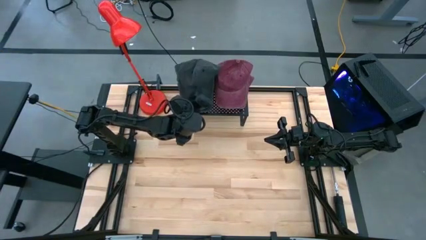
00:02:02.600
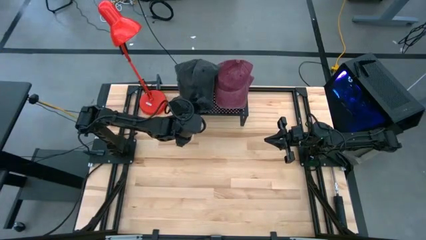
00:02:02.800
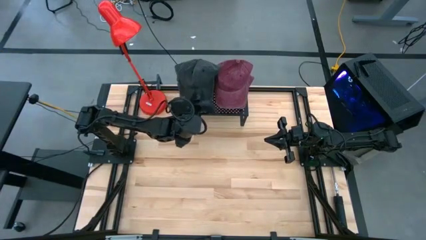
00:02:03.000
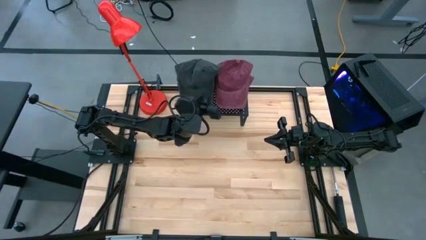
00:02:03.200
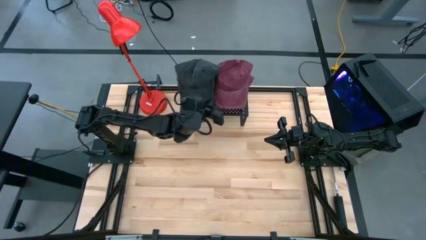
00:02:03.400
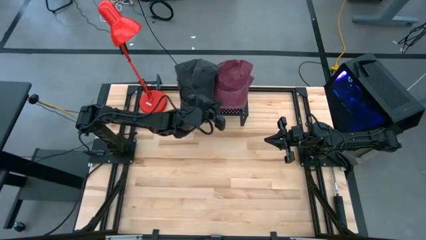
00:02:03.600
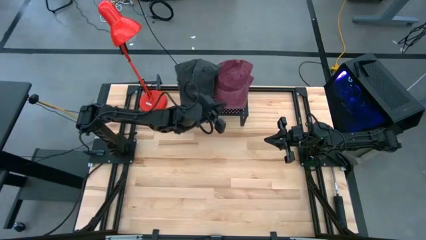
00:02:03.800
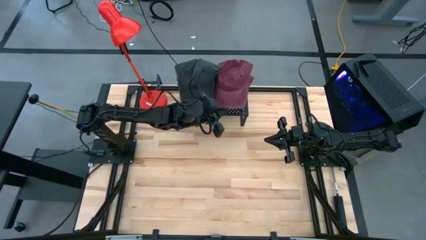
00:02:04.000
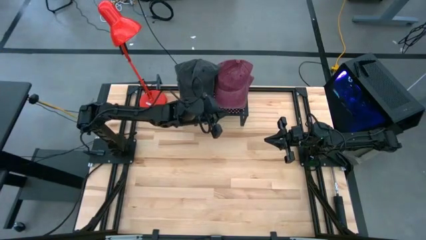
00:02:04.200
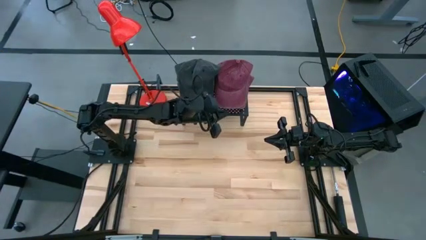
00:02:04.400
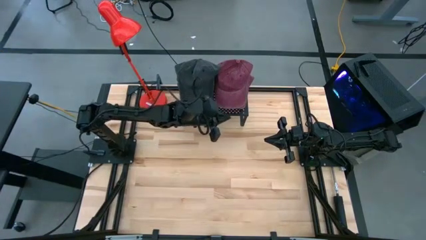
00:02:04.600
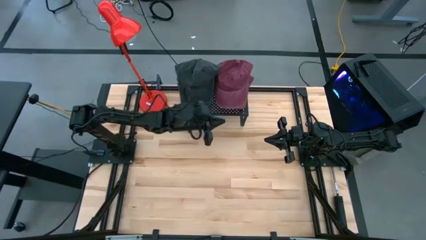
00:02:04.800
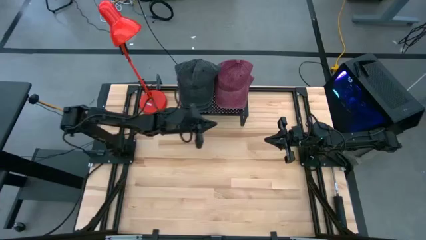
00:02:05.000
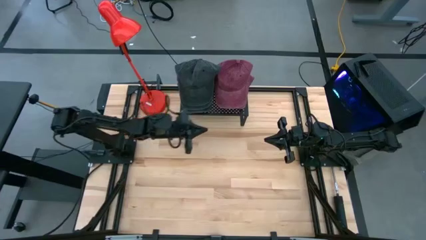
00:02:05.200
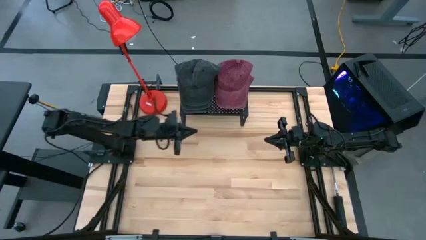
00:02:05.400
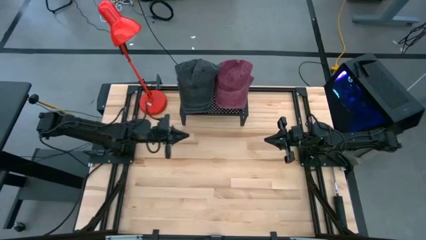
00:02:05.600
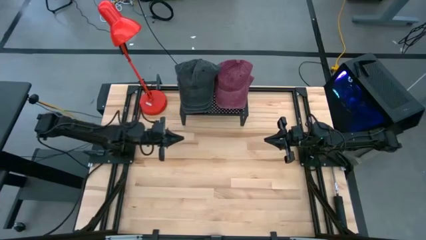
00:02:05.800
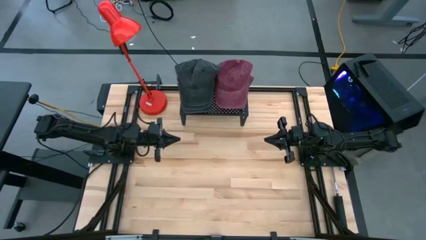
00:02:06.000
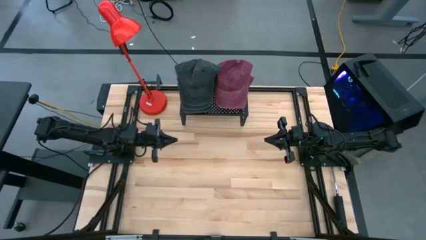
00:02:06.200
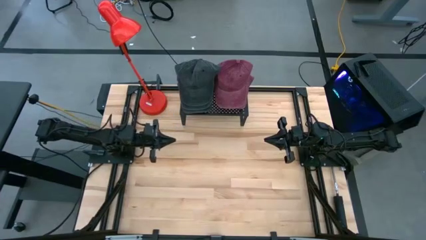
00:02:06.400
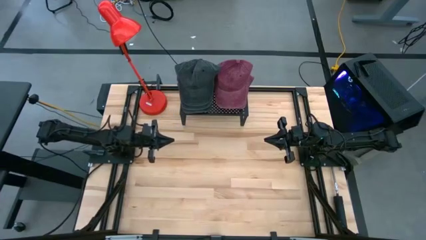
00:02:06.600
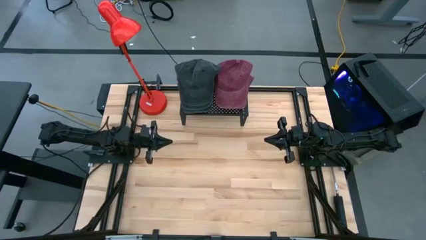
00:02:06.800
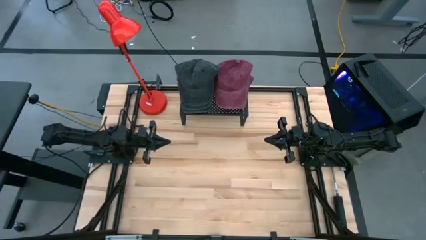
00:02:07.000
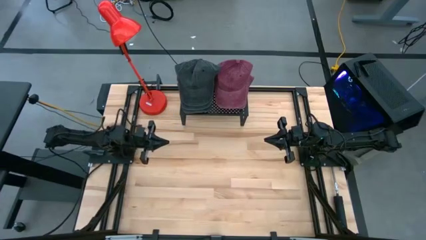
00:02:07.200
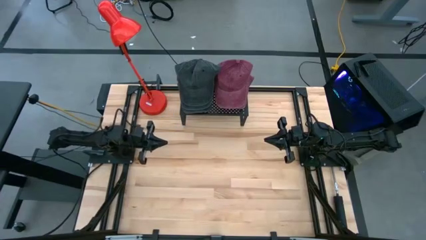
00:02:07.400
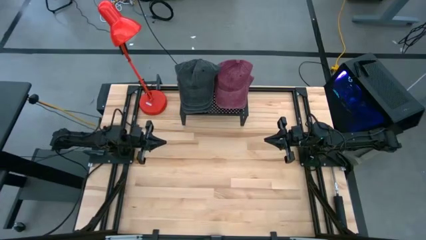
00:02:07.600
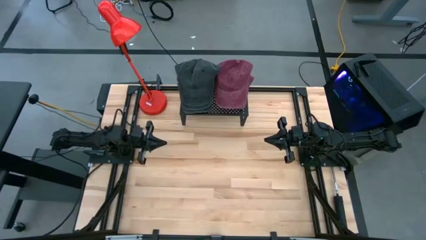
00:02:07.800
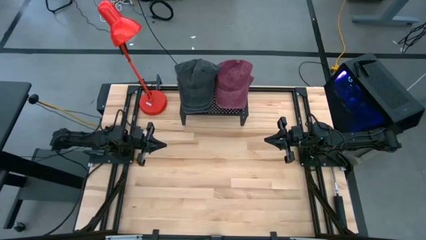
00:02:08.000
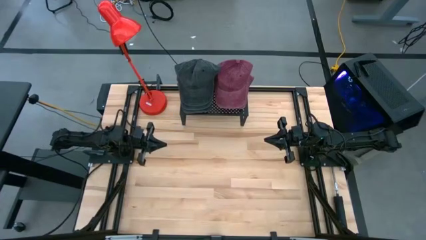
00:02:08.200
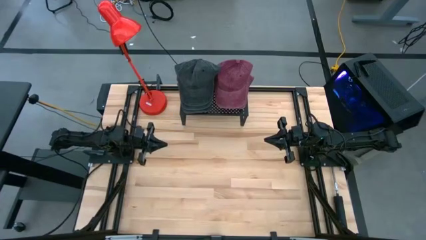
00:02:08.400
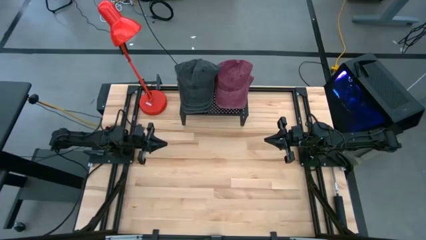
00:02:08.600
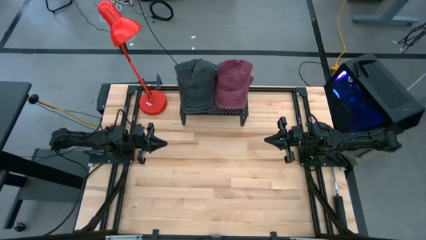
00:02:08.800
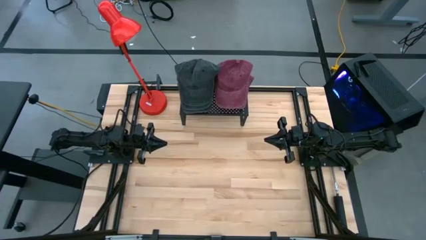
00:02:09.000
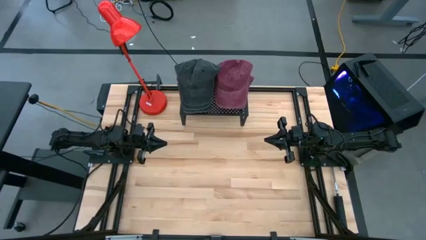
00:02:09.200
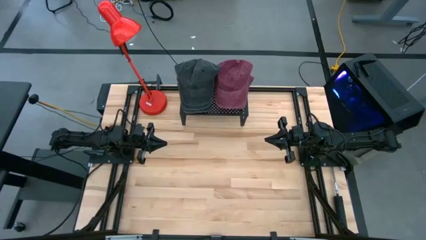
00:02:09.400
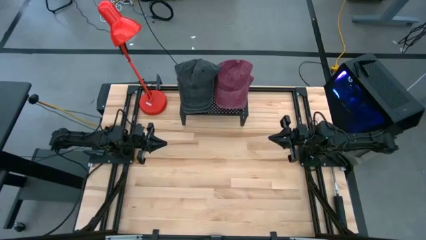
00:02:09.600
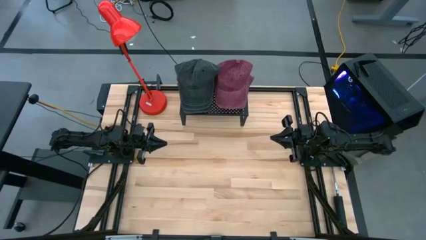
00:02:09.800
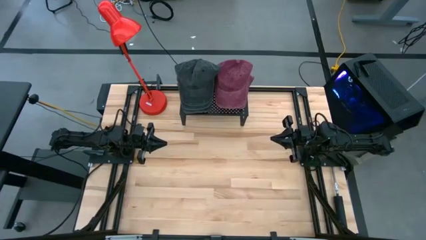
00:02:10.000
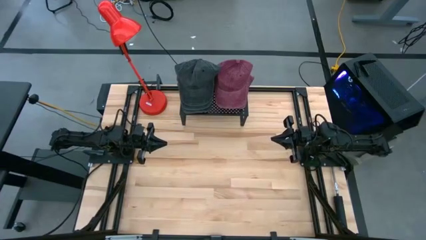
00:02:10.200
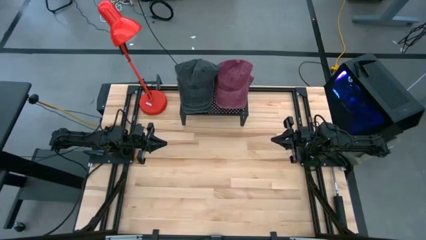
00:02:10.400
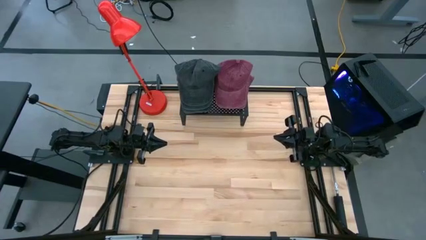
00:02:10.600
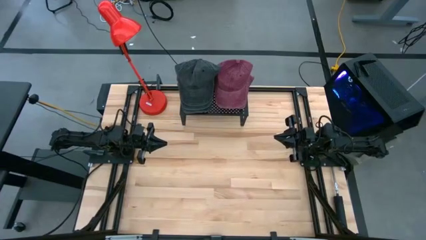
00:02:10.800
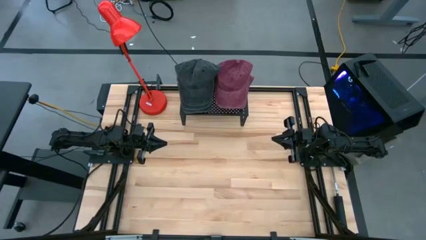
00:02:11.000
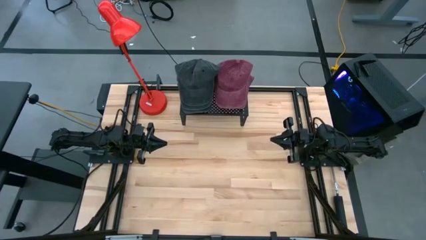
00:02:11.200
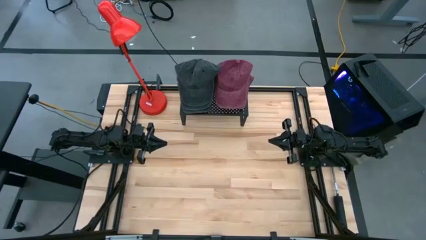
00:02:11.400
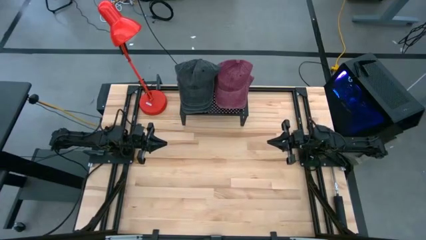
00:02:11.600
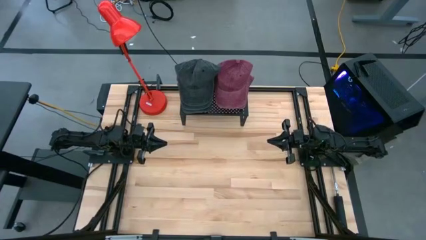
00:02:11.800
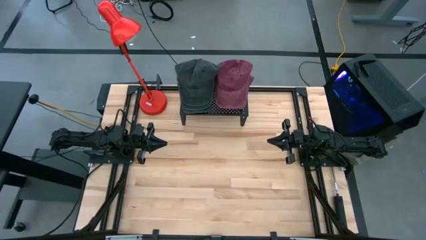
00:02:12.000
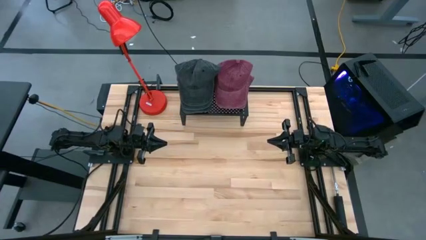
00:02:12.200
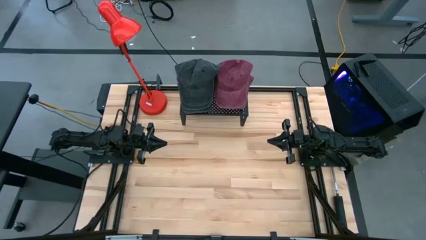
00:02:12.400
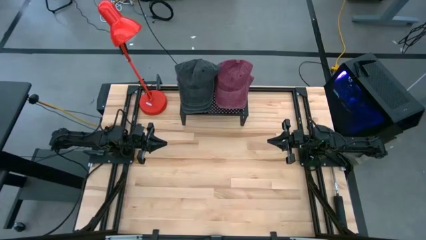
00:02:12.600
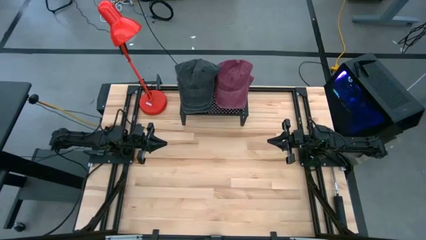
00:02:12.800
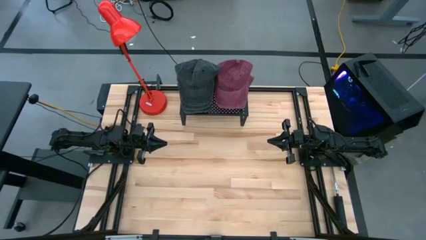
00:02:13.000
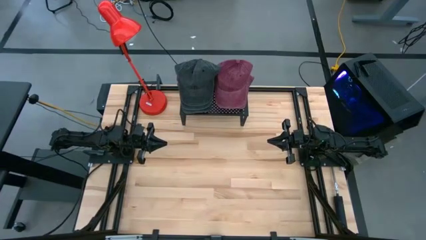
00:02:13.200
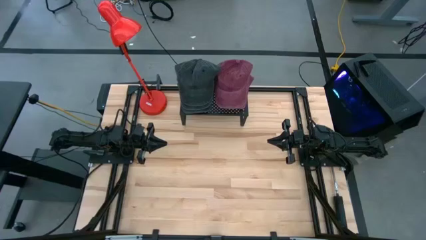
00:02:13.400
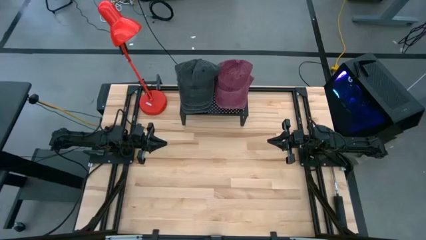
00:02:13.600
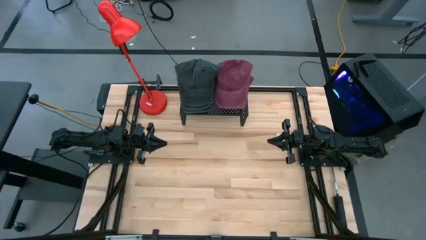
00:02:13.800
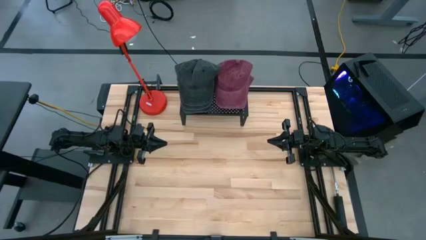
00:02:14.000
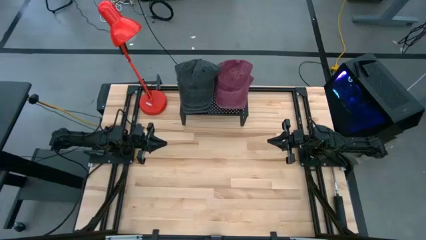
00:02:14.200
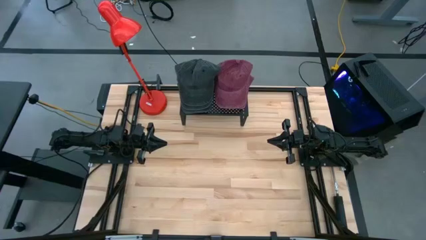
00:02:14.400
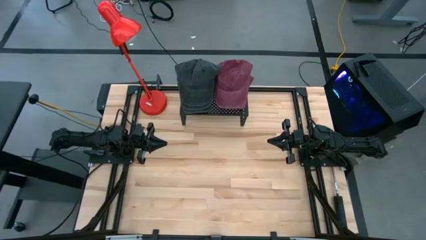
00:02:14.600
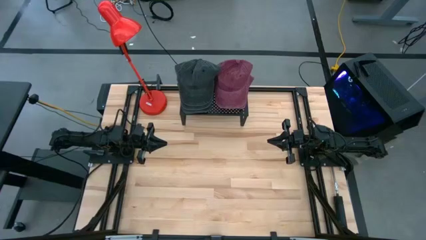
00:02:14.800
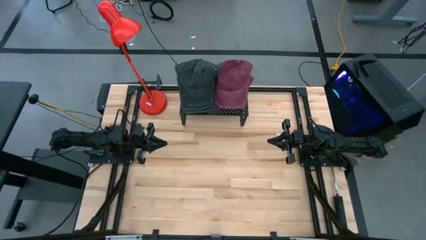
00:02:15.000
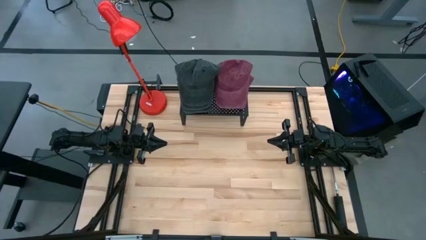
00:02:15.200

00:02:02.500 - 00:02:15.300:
Task: Pick & Place hat
Return to Home Position

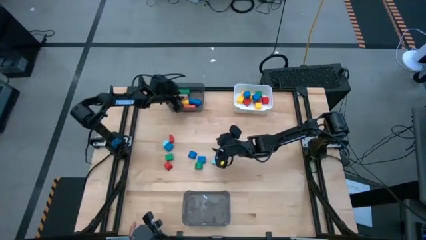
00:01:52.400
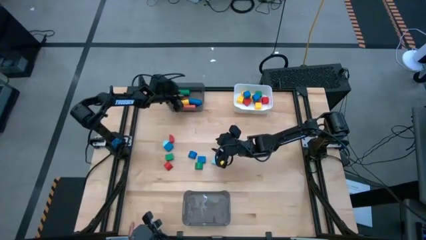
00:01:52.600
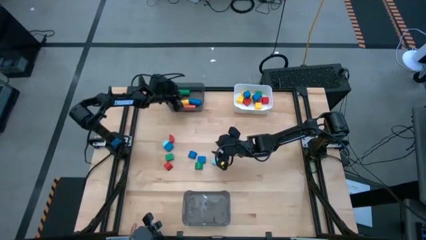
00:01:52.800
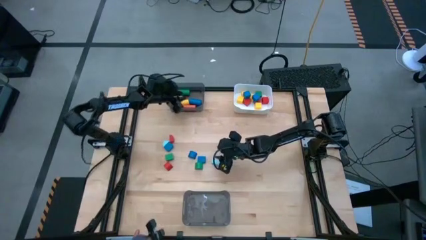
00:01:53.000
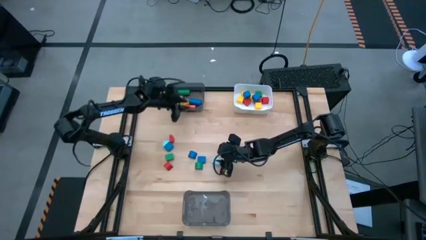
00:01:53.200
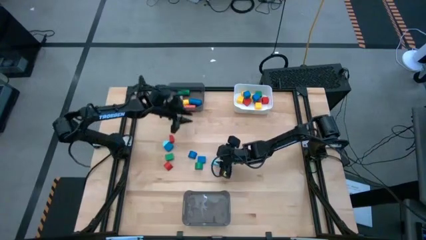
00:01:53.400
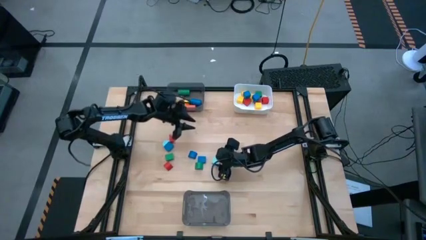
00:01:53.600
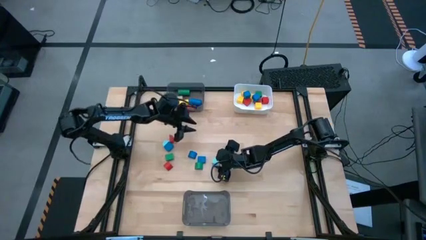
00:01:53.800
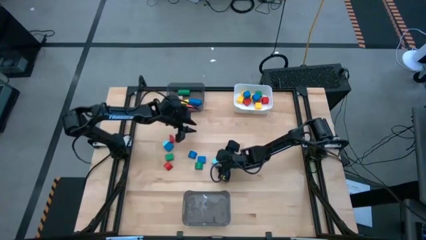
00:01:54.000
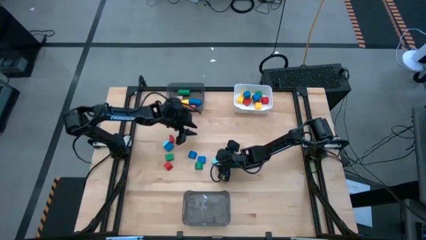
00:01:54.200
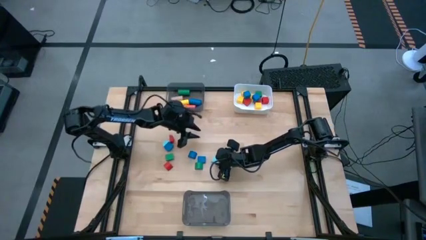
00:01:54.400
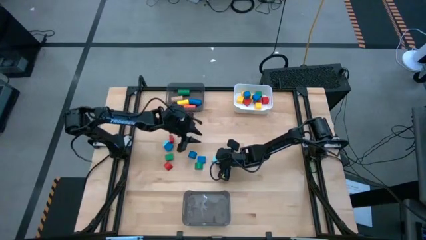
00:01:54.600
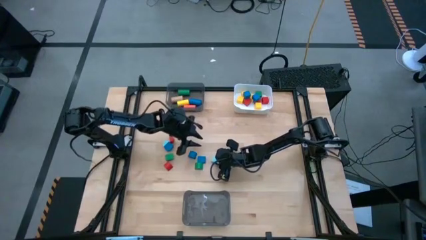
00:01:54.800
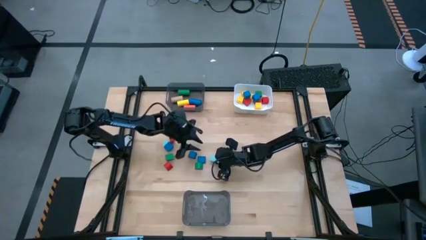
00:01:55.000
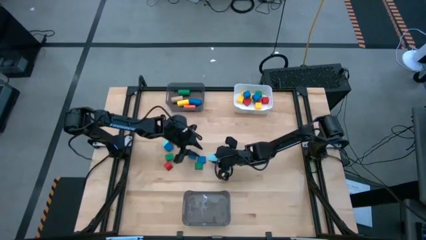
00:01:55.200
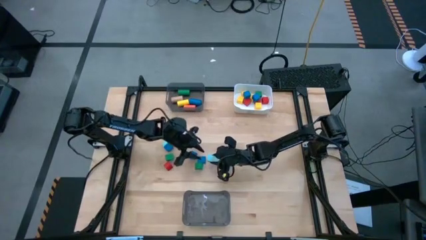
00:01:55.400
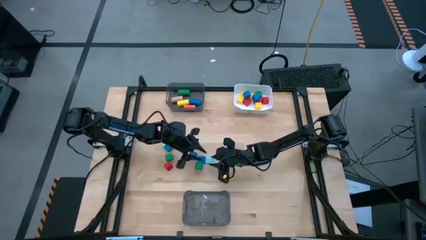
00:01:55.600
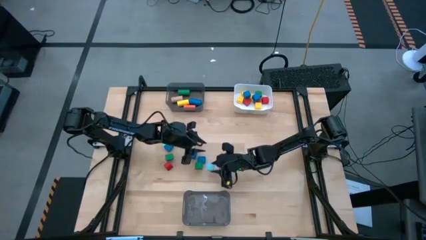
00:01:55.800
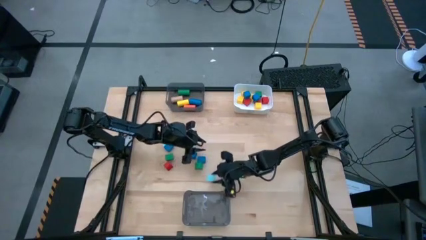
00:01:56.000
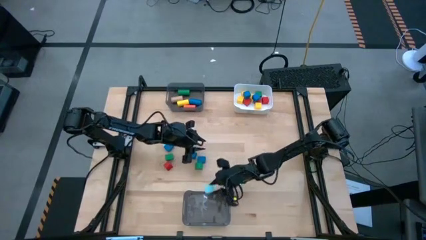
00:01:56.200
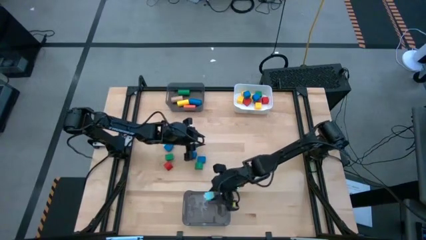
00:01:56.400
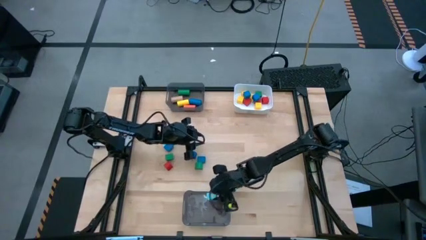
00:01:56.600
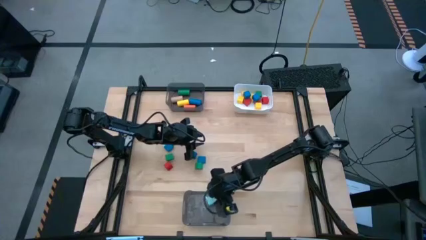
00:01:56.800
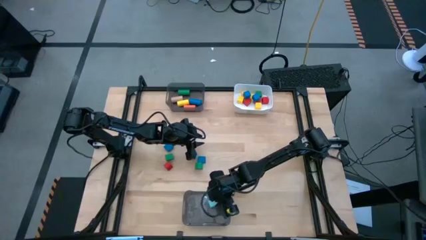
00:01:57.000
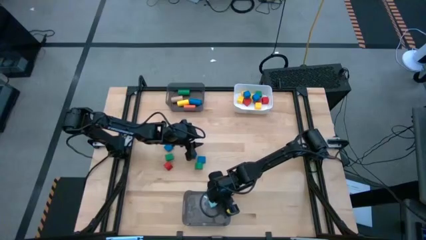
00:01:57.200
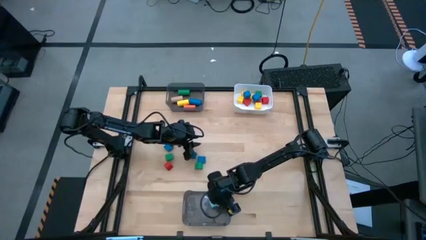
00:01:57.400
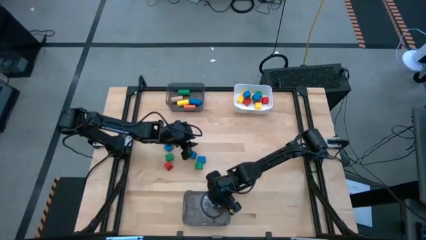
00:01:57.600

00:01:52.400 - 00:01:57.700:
Task: Sort blocks by size
Put the light blue half circle block into the bottom black bin
